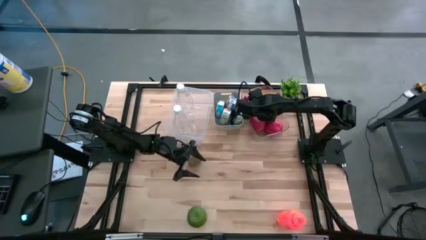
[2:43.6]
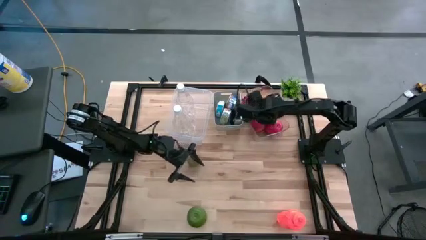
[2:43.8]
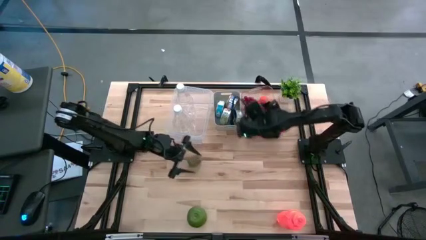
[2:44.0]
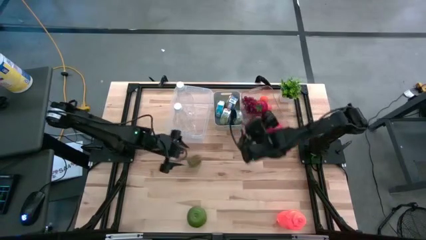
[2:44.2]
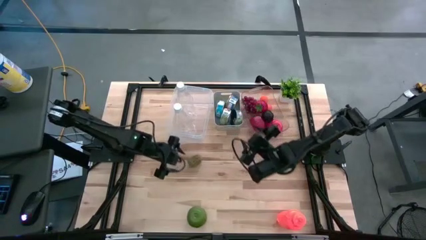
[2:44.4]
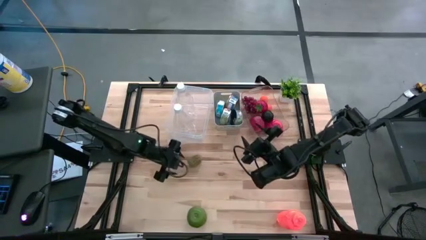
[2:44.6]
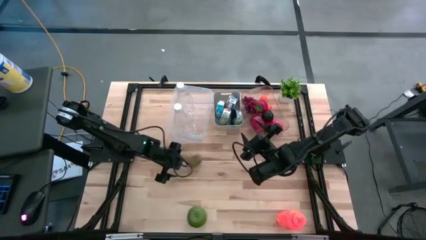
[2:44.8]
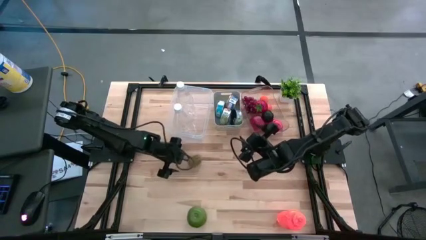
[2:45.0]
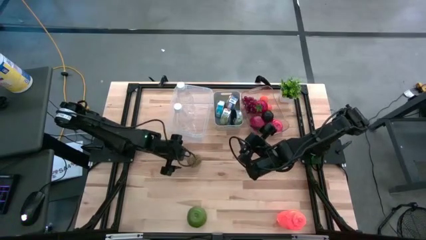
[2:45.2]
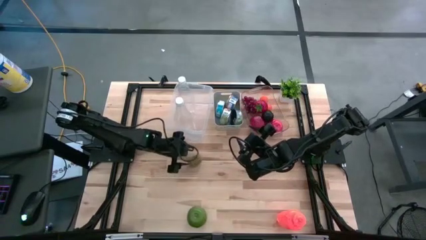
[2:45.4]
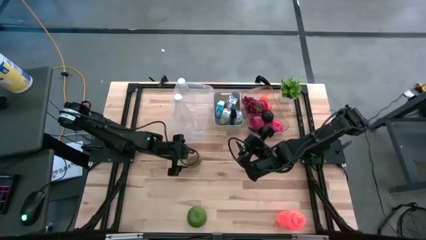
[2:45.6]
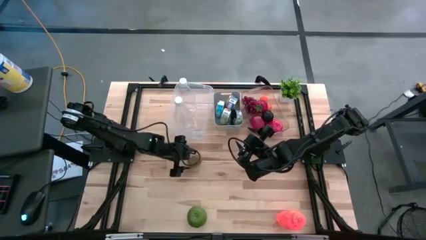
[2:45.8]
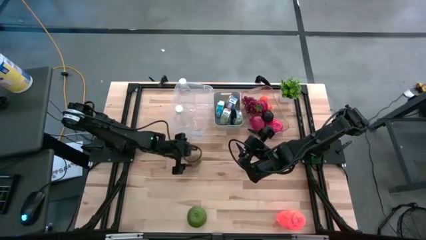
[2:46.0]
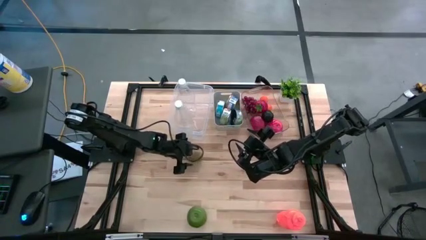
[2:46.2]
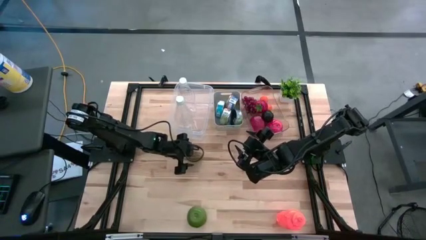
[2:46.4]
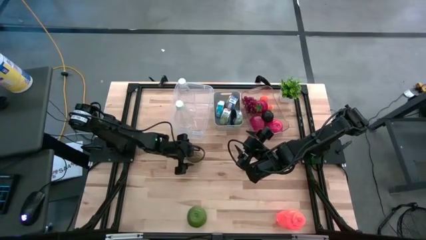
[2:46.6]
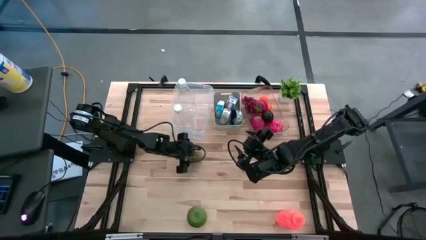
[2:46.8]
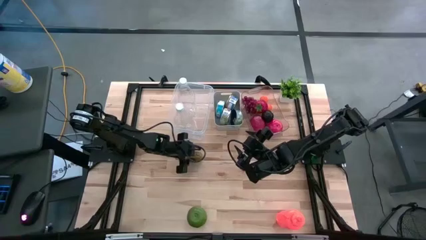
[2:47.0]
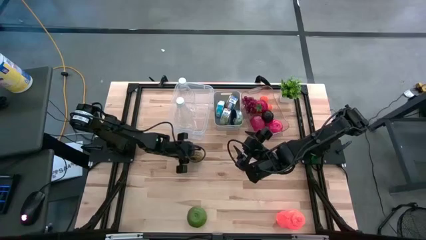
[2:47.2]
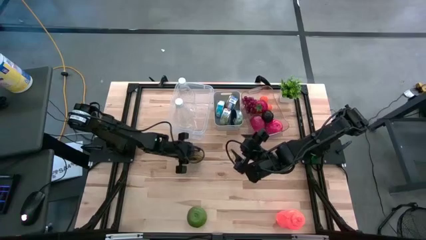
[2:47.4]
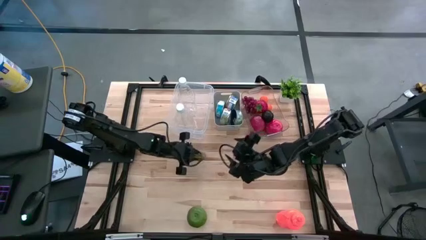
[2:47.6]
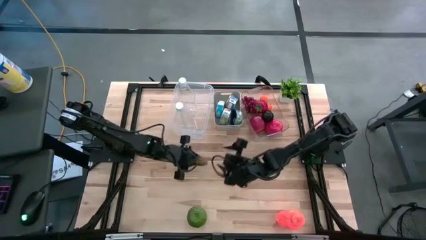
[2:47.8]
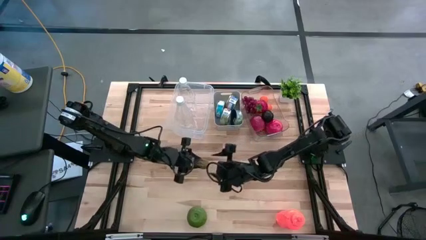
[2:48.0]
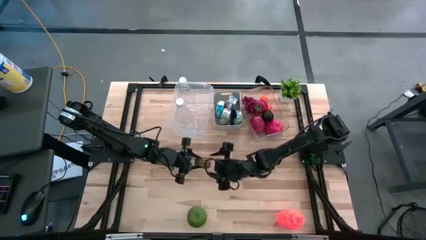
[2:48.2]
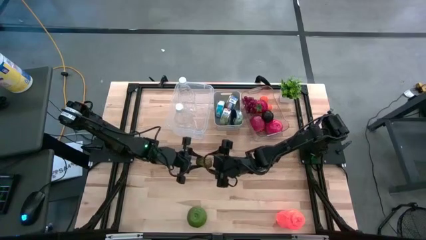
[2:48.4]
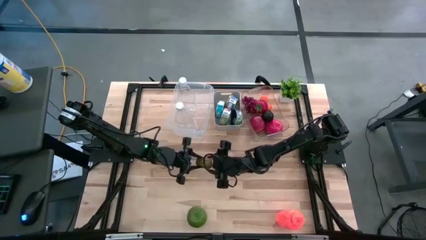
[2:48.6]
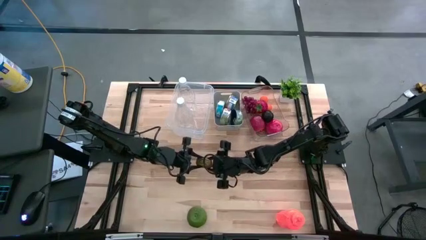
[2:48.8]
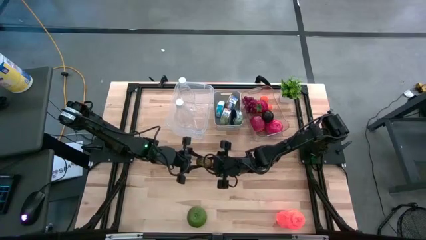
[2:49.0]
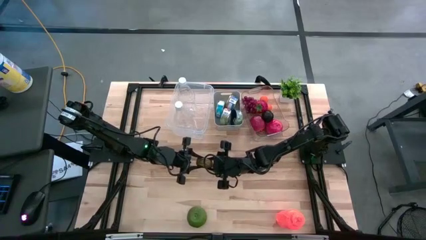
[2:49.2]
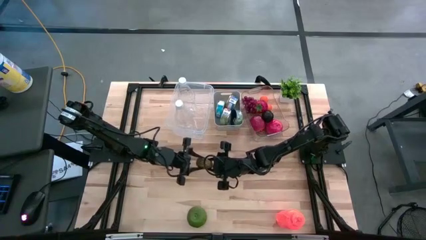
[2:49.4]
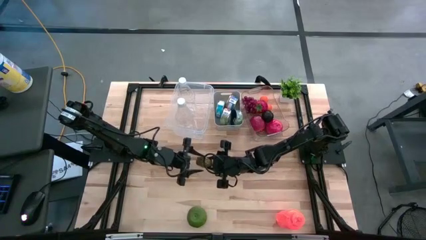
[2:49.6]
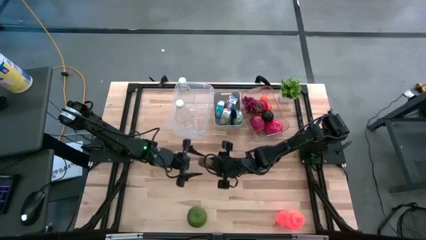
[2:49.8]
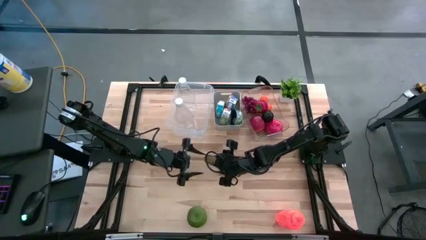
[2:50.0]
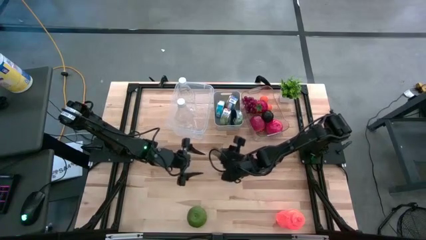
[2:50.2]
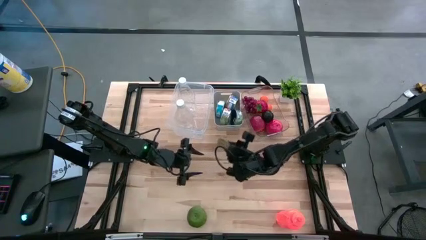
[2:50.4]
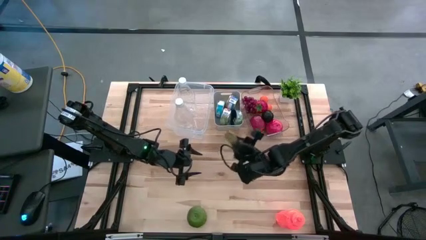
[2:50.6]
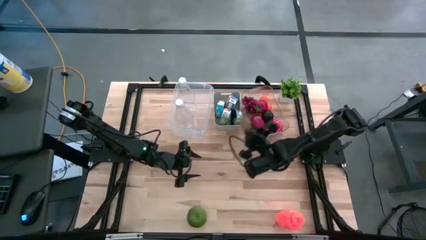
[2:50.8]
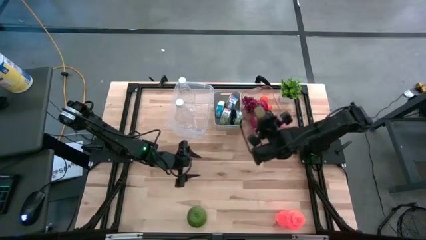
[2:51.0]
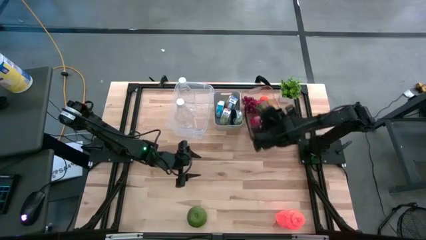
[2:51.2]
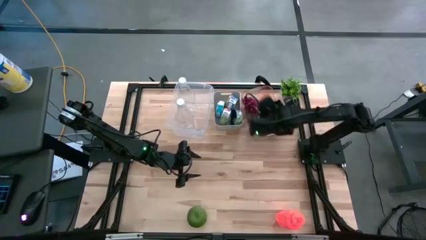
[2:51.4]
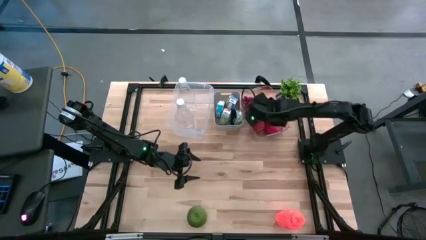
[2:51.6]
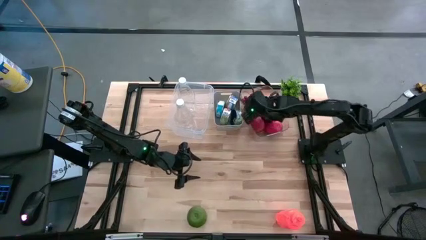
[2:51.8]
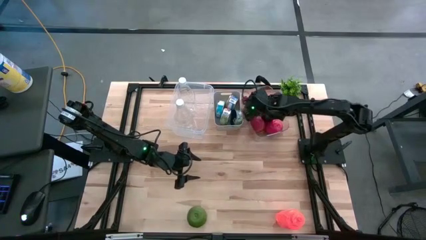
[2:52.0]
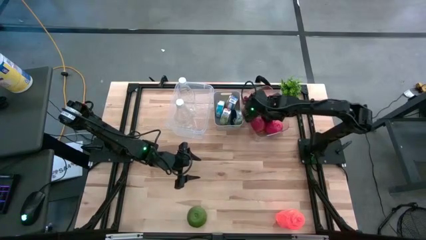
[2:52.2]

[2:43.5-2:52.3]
Task: Pick & Place Food Item
Put the kiwi into the right transparent bin

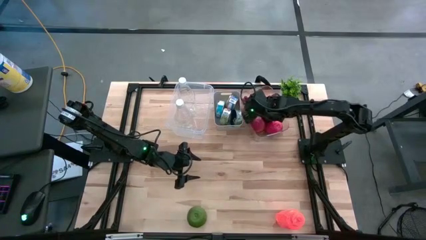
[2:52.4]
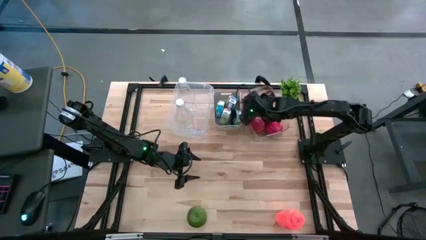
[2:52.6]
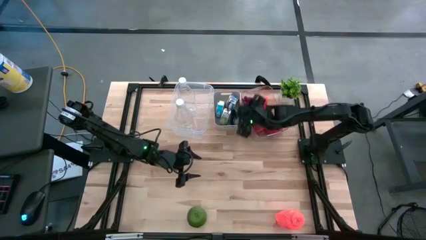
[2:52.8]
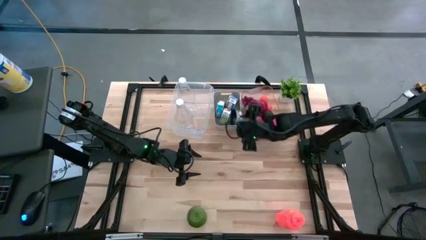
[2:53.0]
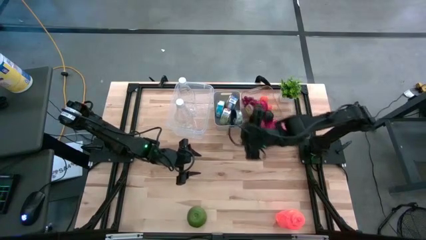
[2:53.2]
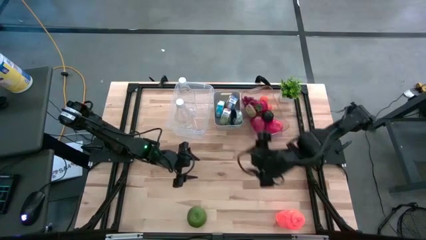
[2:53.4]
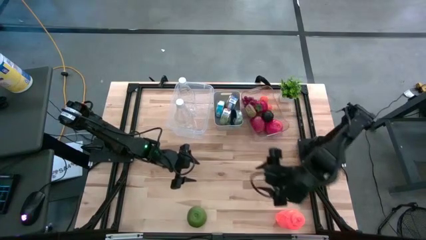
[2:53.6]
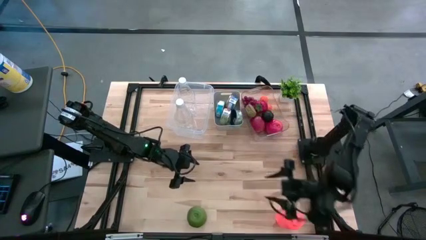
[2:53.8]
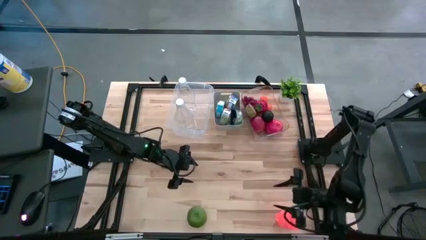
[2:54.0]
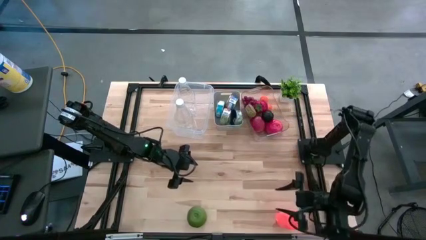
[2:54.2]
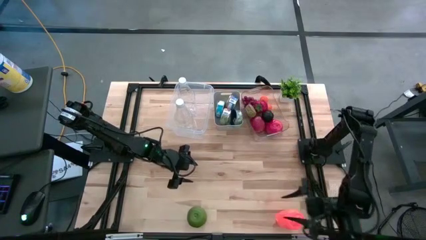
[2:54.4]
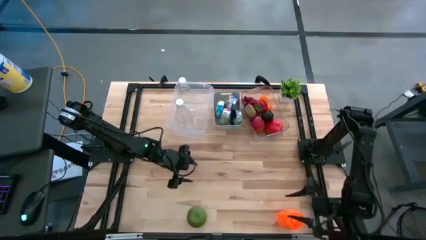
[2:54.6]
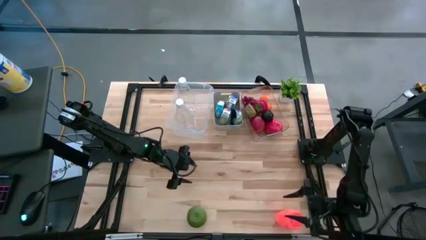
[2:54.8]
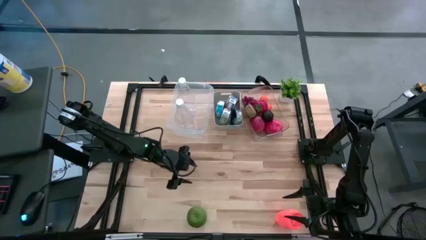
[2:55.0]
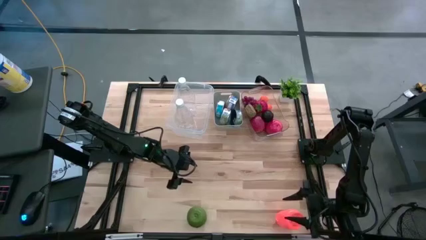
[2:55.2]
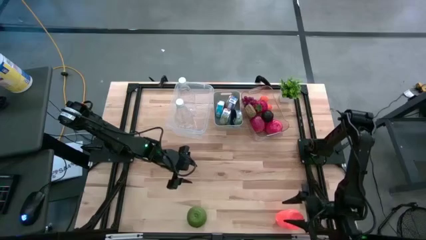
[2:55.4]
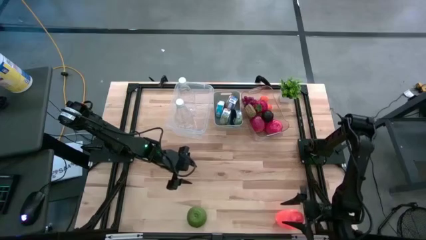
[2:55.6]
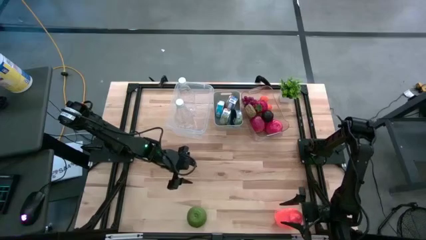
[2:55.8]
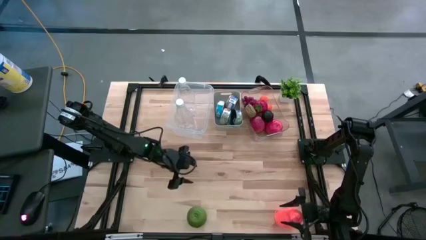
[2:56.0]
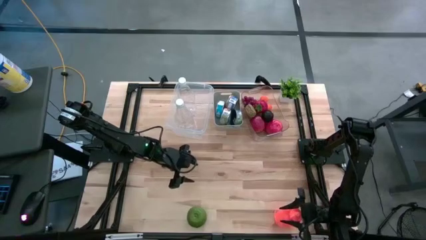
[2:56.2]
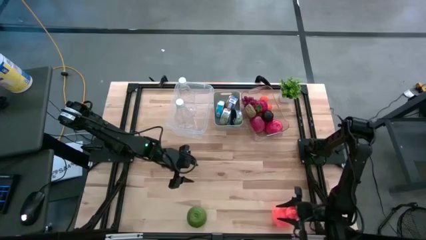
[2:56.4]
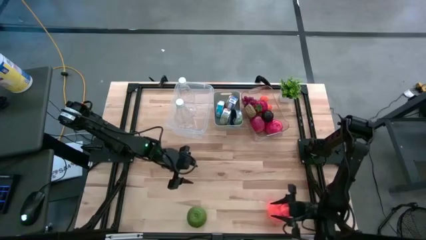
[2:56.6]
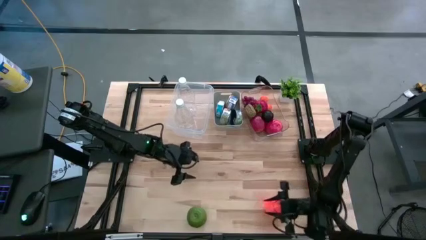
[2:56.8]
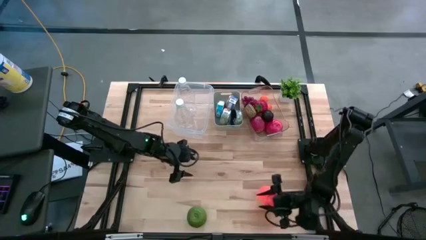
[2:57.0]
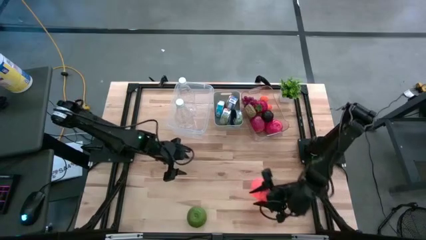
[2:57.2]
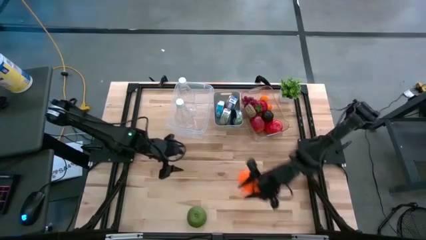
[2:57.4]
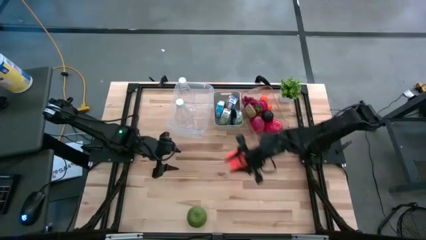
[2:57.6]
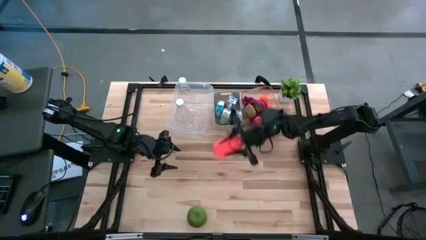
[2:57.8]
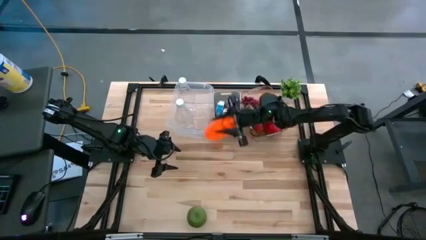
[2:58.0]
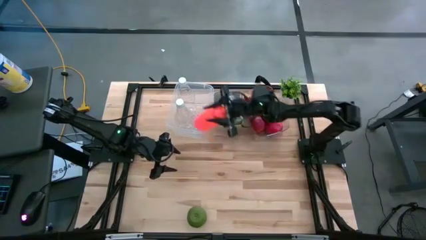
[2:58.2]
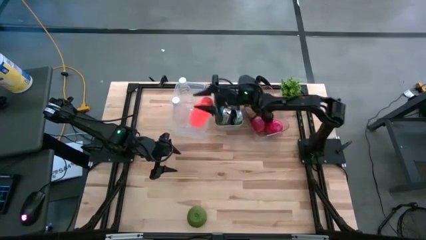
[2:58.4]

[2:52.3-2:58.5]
Put the orange water bottle into the left transparent bin

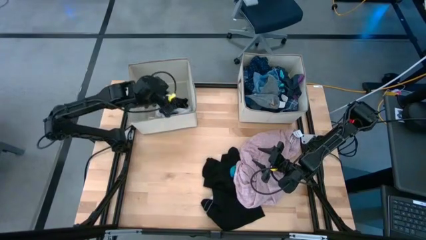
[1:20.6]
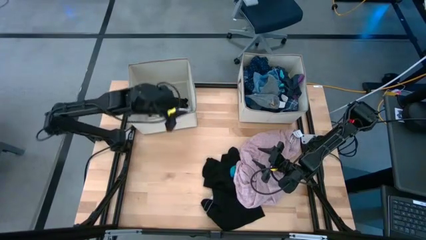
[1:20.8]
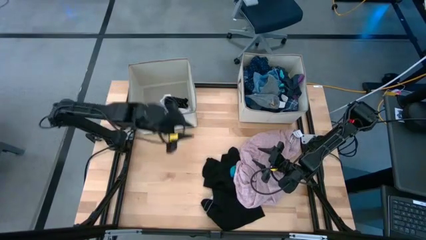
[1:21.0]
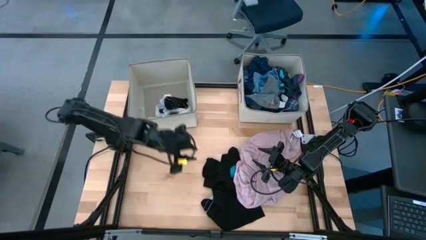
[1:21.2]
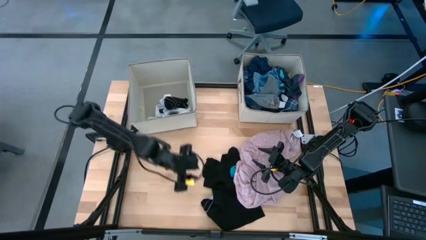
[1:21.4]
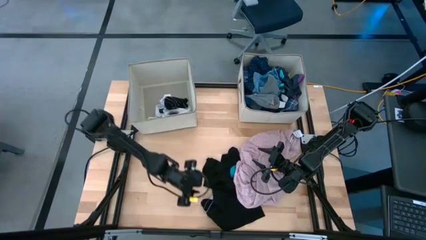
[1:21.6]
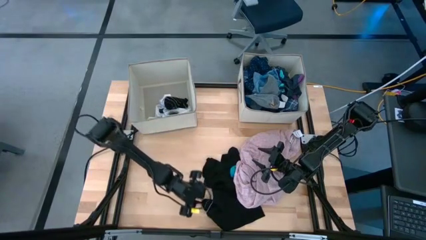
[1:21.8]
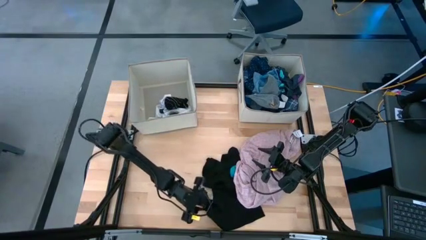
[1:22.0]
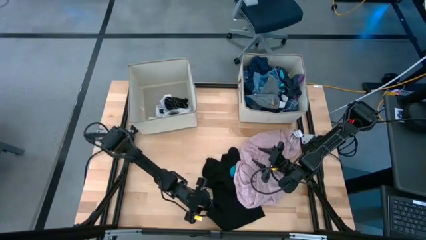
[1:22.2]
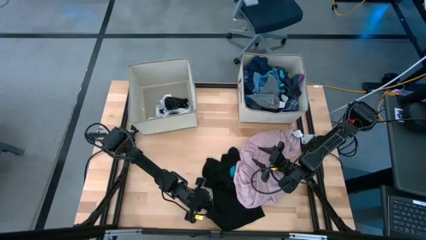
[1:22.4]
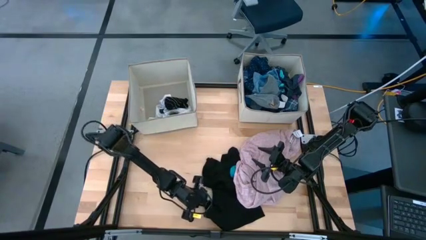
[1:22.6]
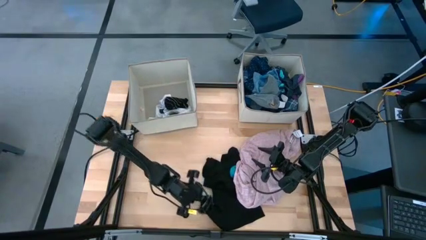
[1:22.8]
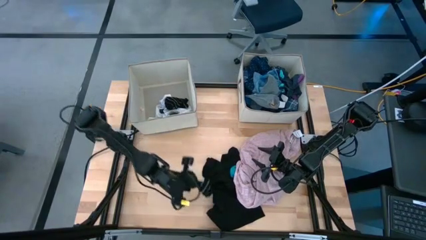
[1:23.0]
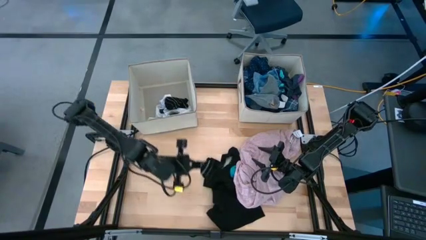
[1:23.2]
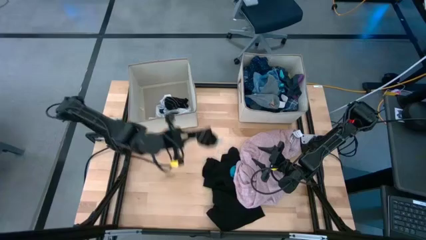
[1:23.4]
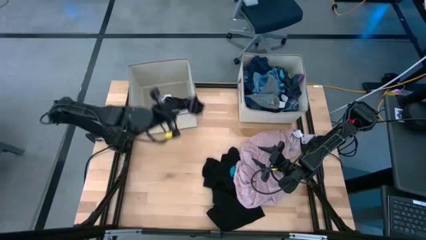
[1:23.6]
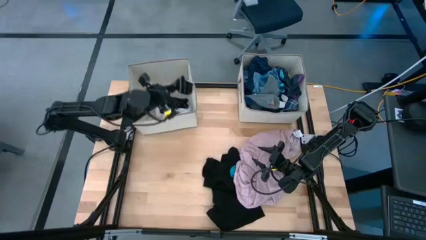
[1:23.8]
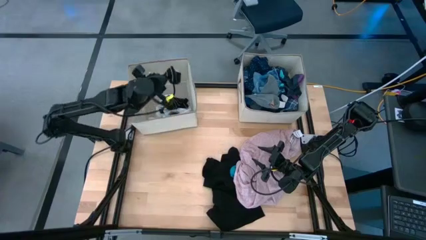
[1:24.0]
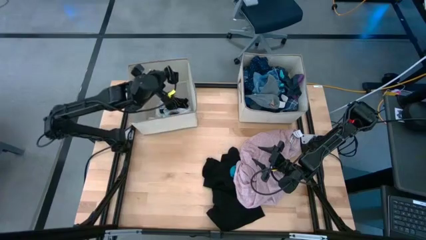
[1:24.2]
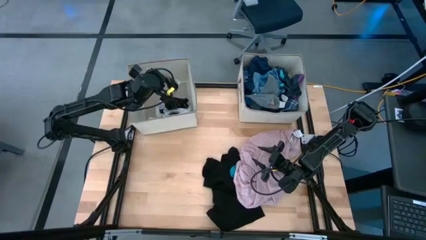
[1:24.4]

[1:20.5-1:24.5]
Task: Sort clothes
Put the black sock into the left laundry bin
